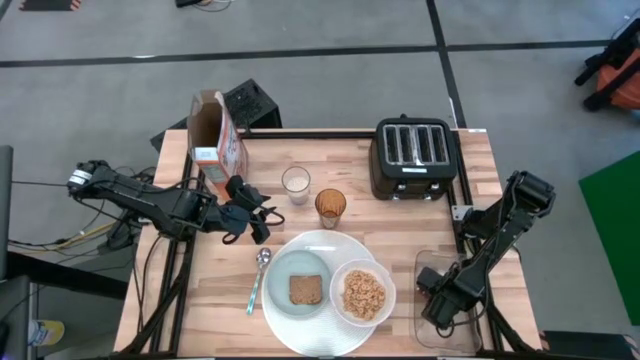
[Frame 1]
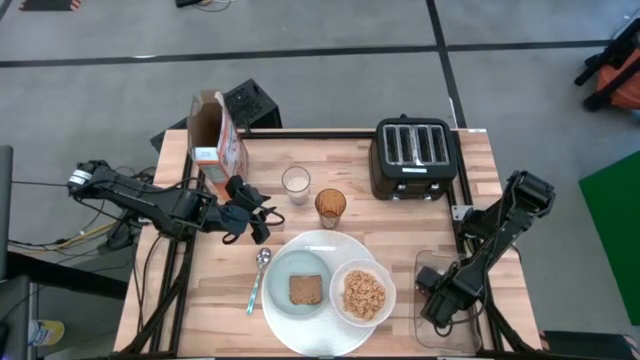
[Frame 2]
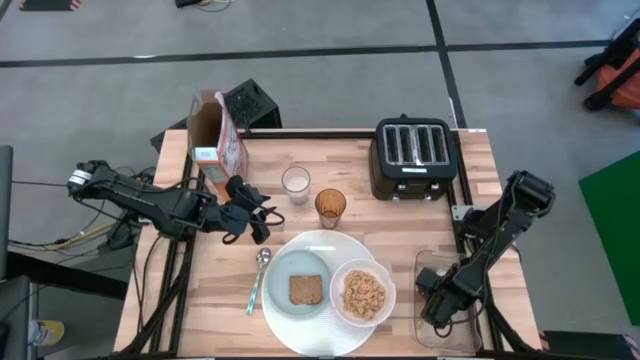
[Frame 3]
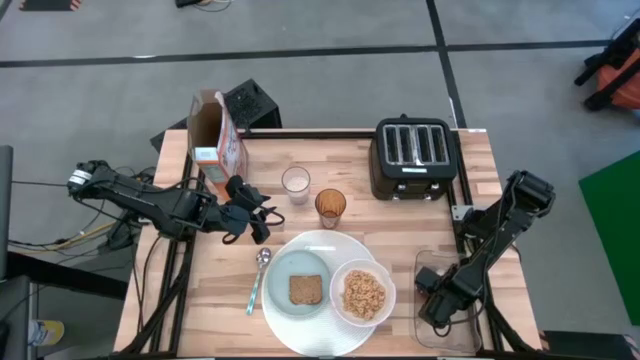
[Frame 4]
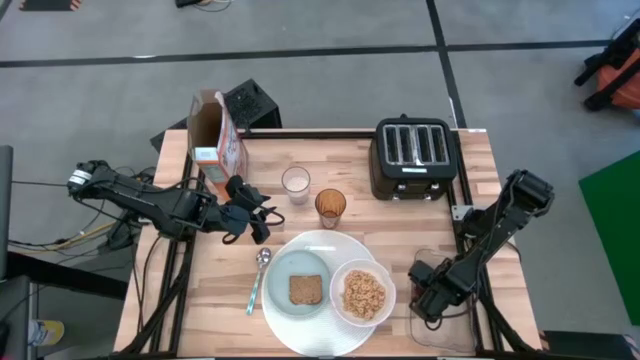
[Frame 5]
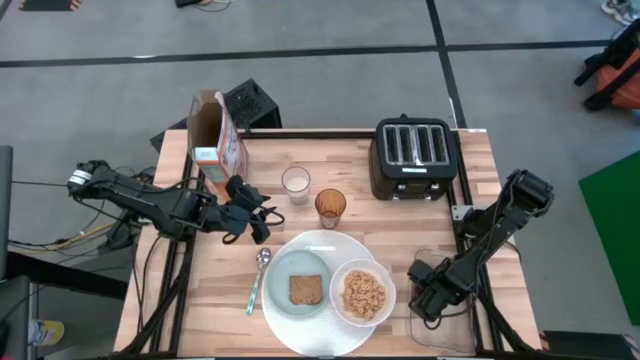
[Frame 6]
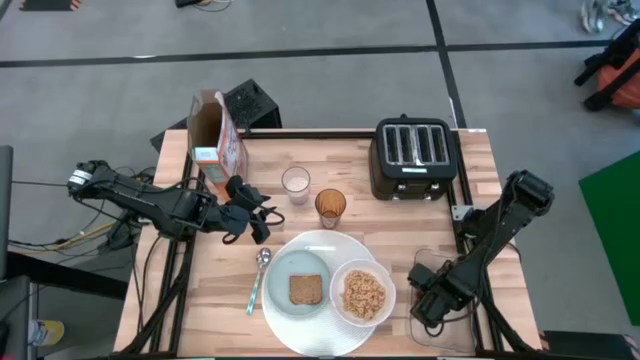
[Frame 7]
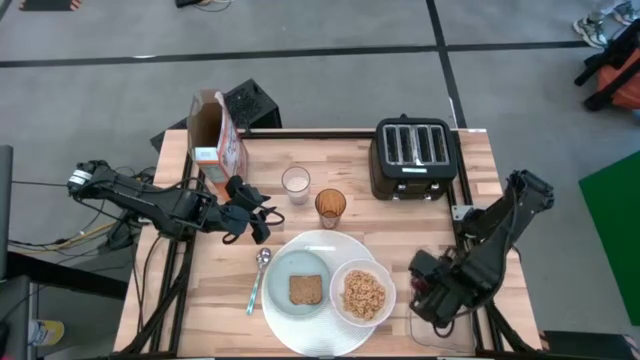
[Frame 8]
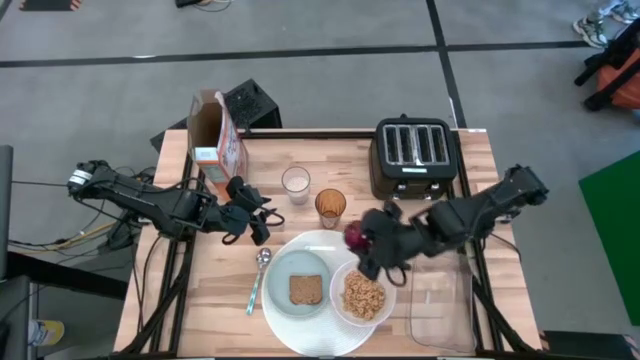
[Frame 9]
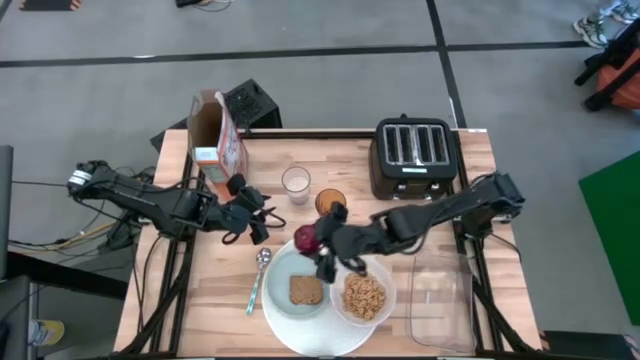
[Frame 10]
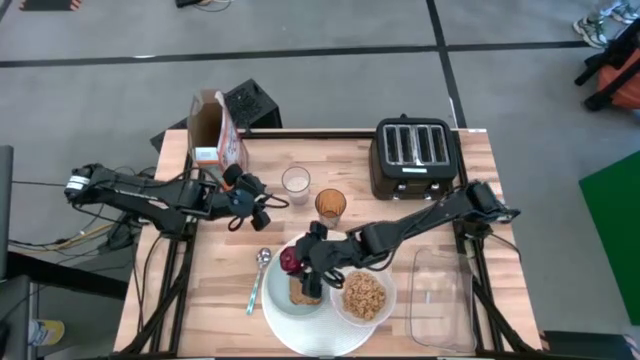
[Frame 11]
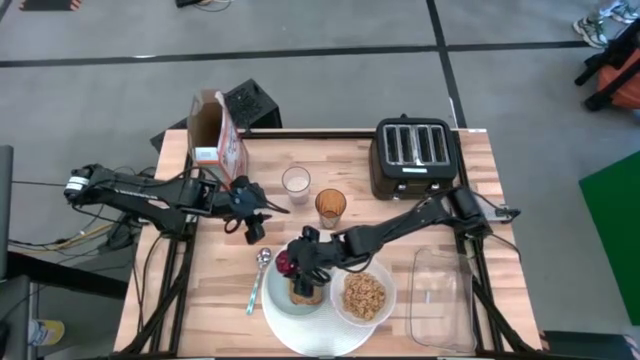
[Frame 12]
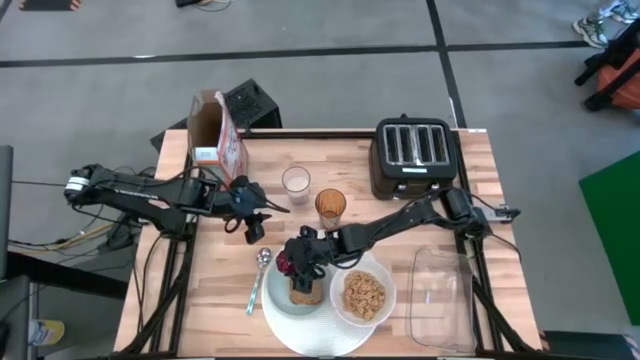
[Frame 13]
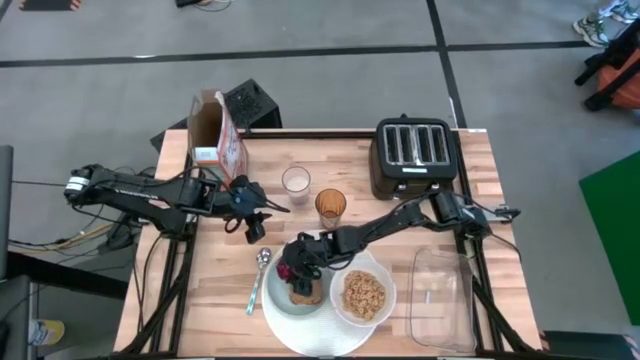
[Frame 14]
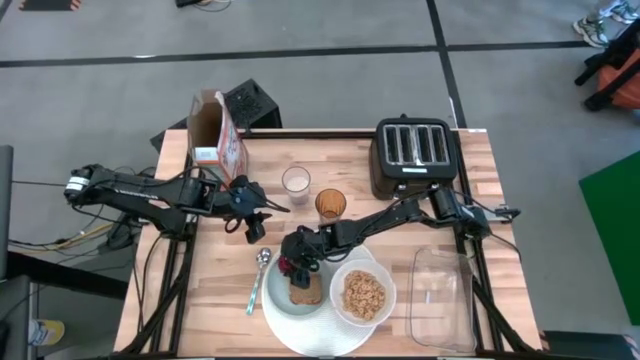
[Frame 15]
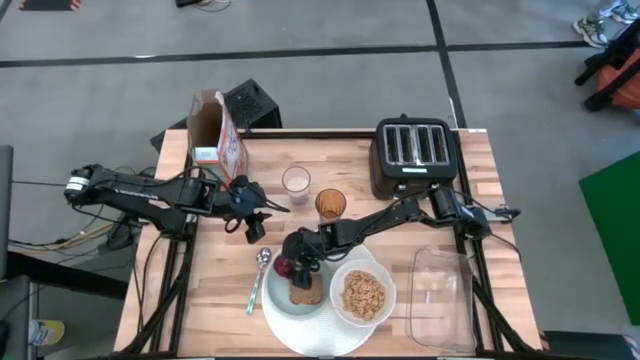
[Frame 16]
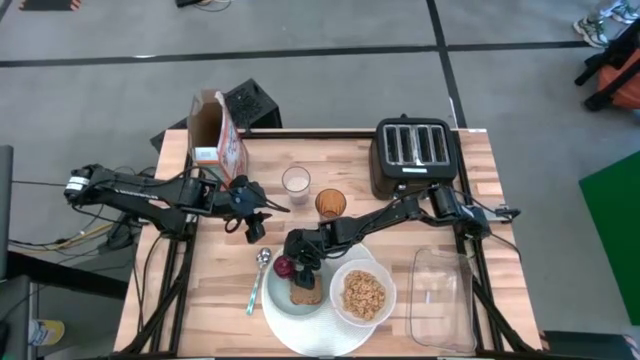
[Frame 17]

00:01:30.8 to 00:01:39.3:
Task: Arrange a breakfast setting
Put the apple on the gray plate

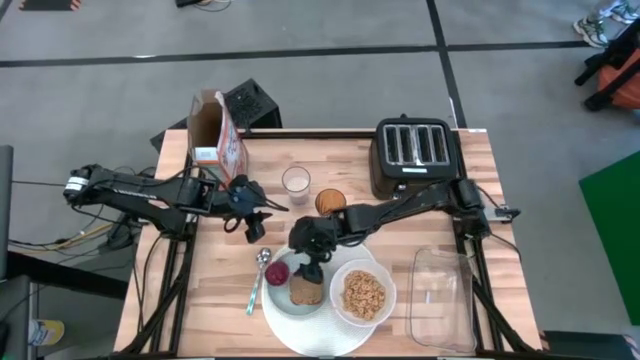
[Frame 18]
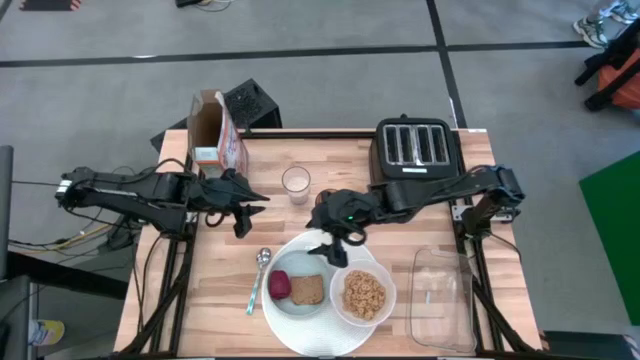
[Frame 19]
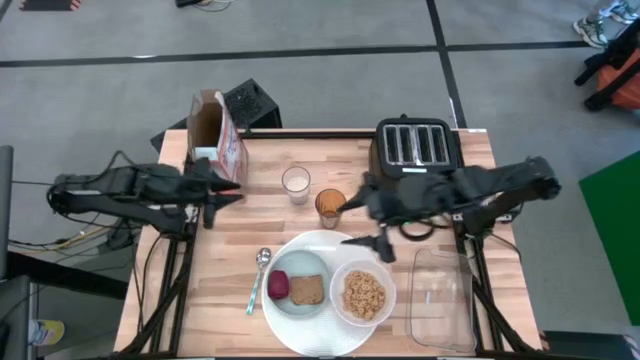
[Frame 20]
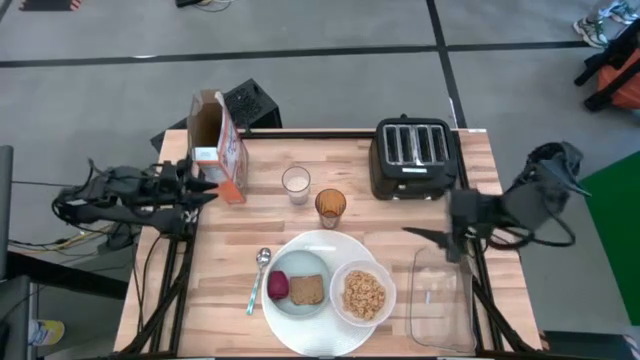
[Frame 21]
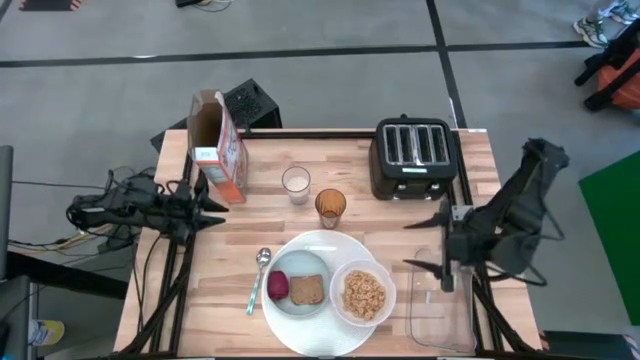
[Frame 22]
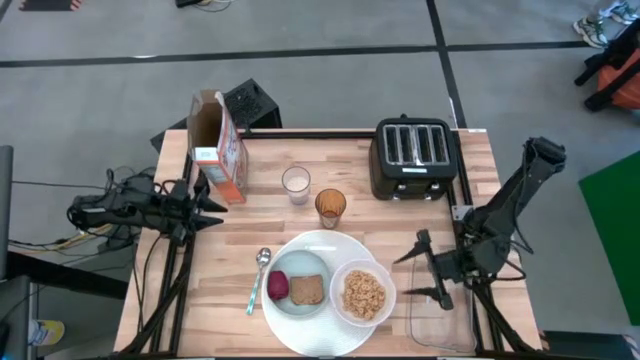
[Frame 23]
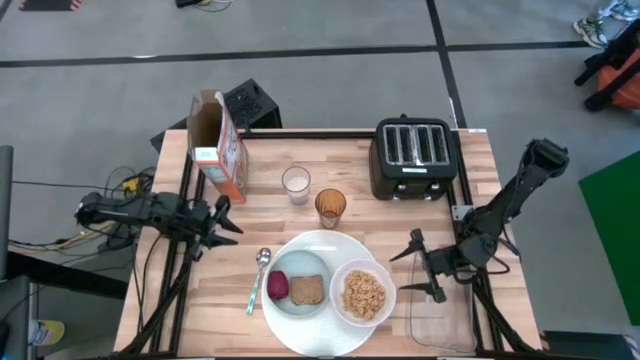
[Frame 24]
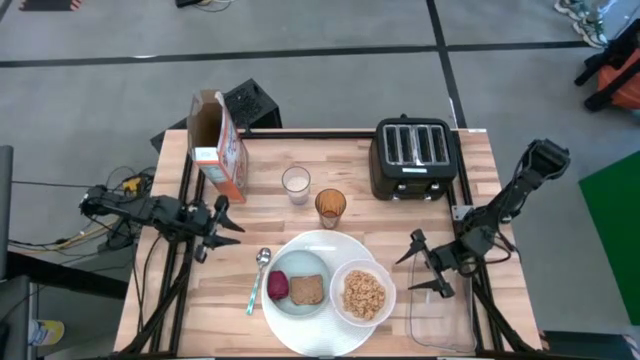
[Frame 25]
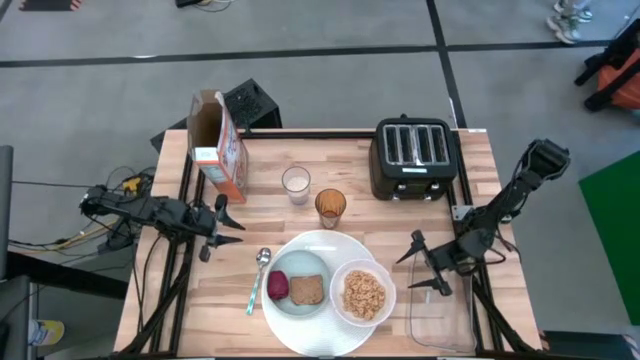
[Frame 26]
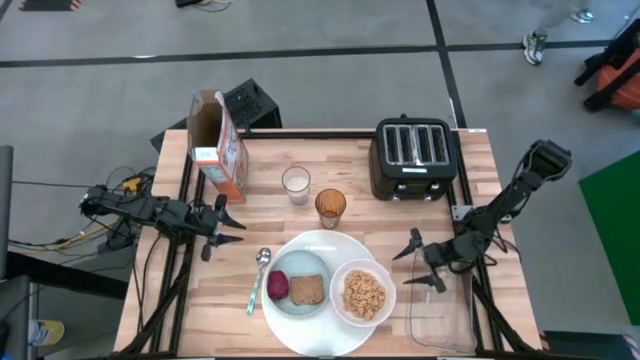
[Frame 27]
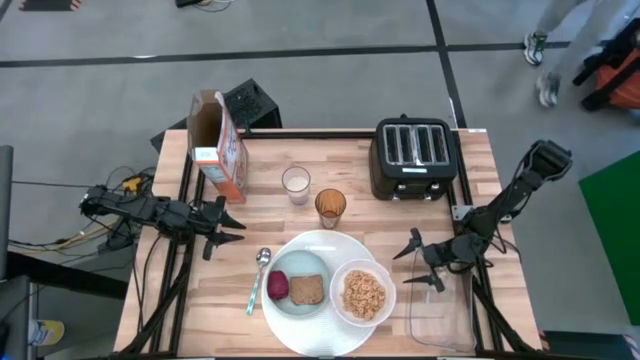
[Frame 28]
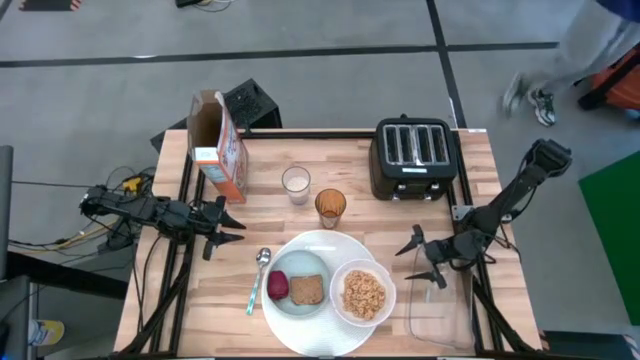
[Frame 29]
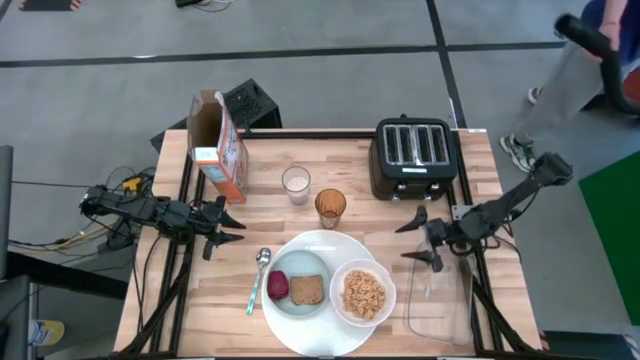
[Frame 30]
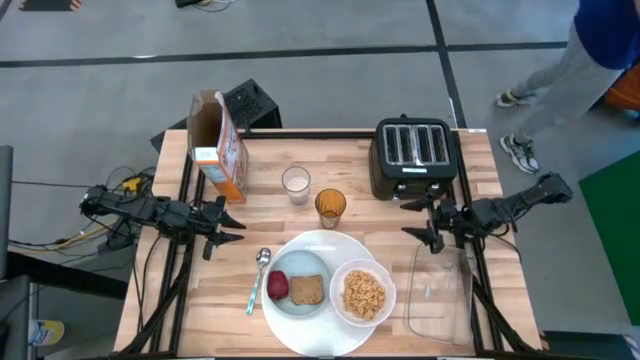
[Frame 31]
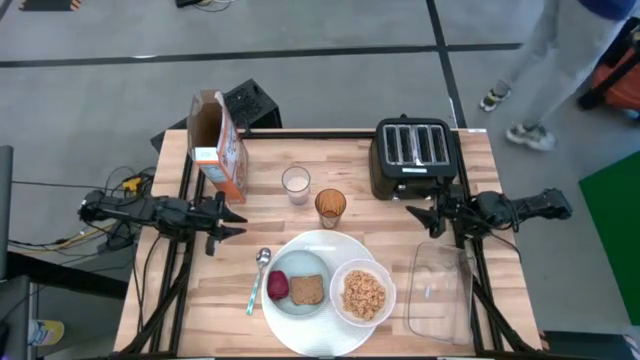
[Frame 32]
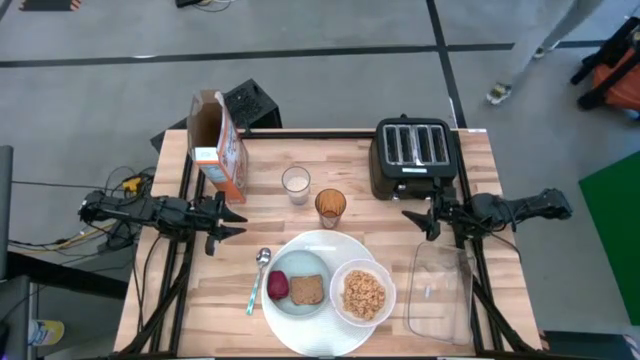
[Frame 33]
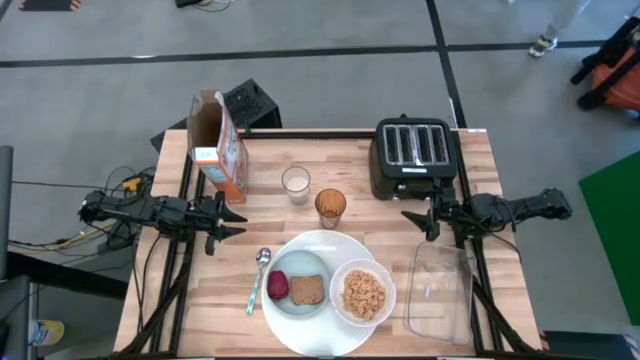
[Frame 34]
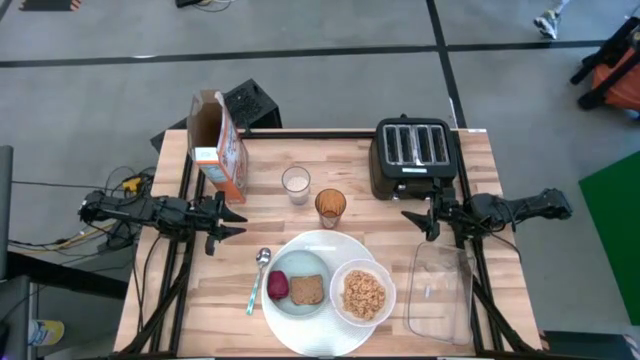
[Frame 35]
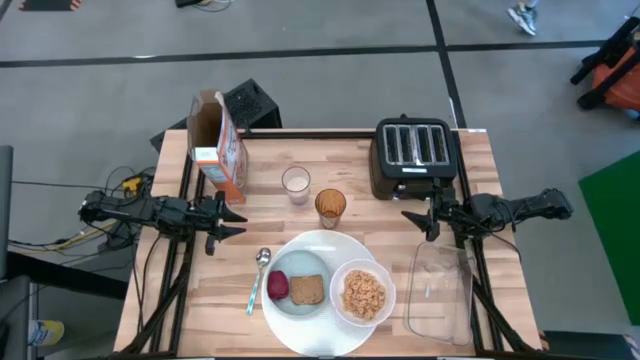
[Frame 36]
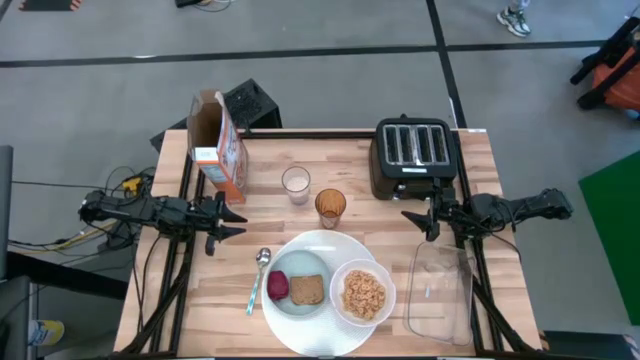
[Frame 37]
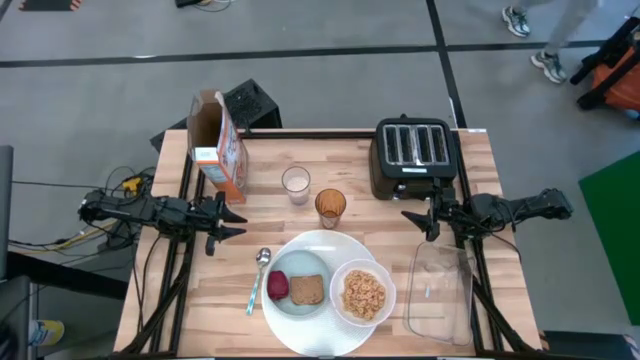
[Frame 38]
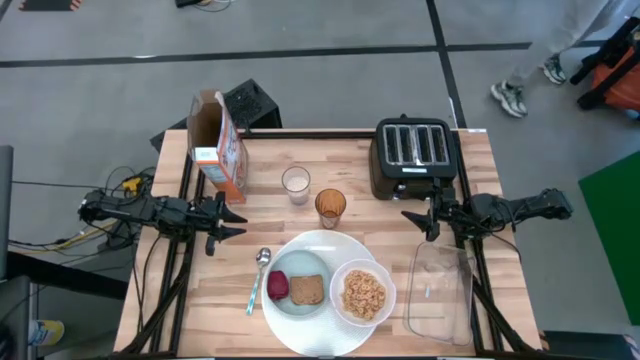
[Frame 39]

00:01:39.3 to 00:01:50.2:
Return to Home Position

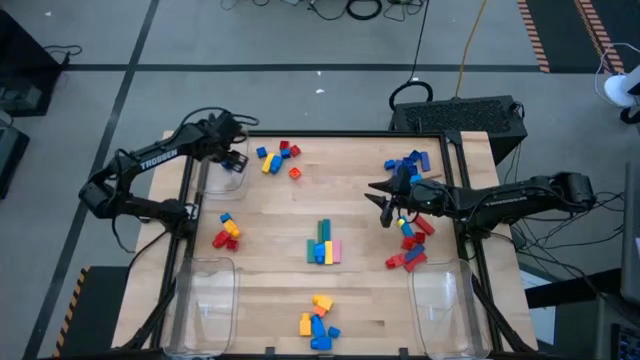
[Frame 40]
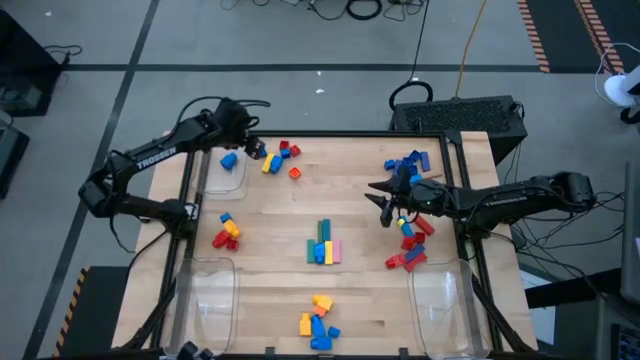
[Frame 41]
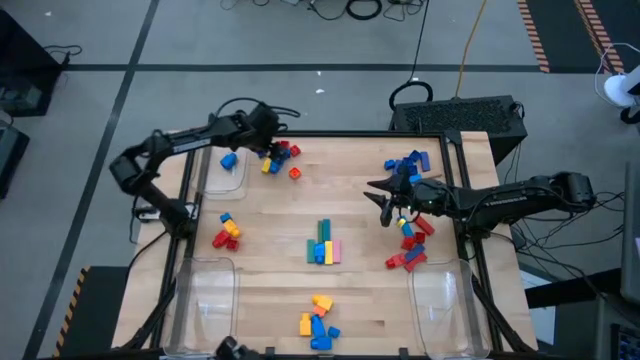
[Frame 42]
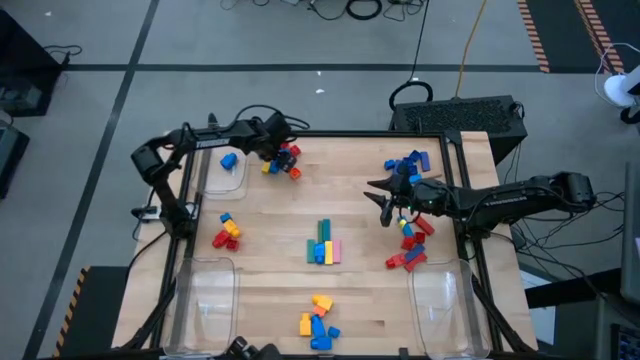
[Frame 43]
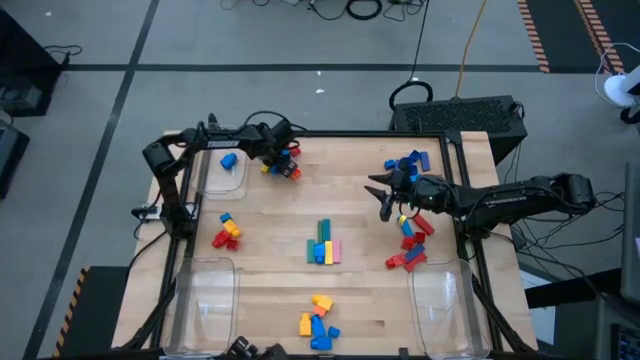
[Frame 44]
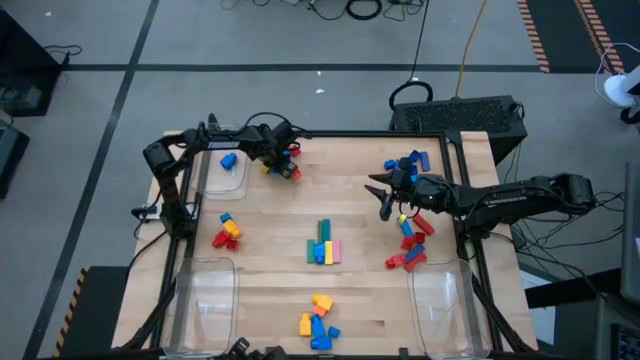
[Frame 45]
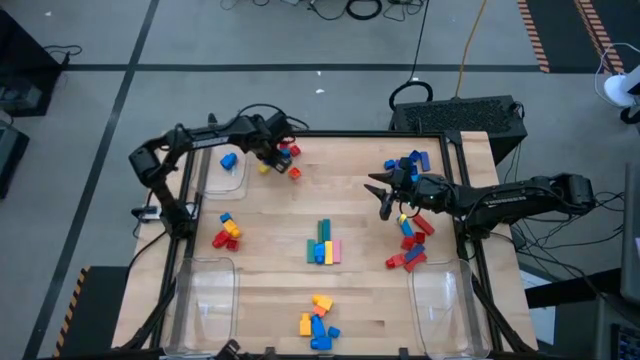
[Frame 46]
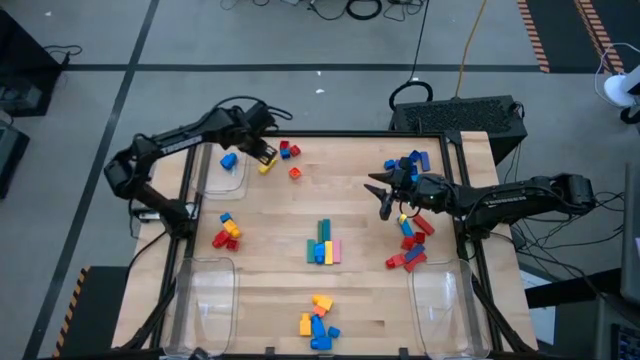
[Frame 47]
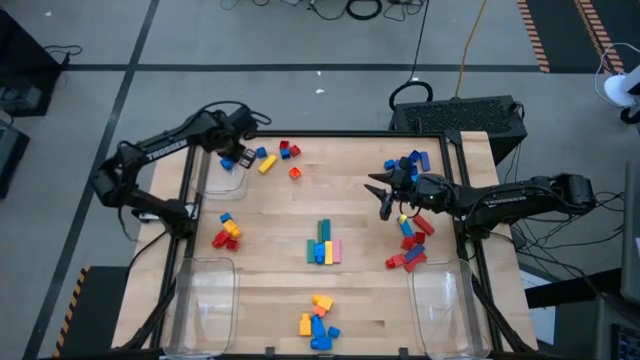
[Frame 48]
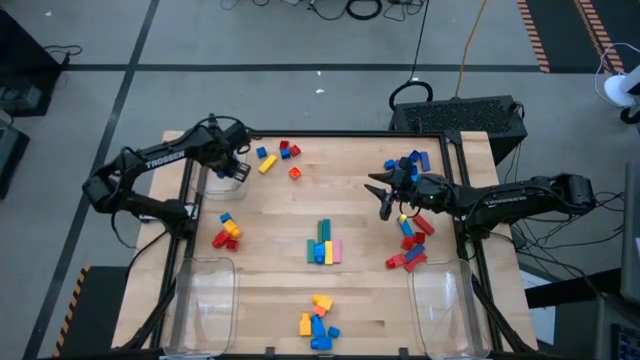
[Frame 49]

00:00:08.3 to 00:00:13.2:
Task: Sort blocks by size
Put the blue one stud game piece into the top left transparent bin
